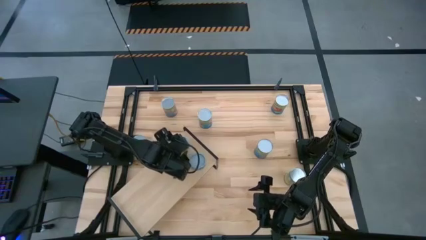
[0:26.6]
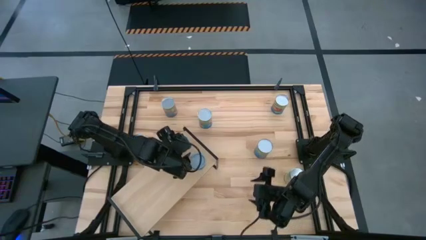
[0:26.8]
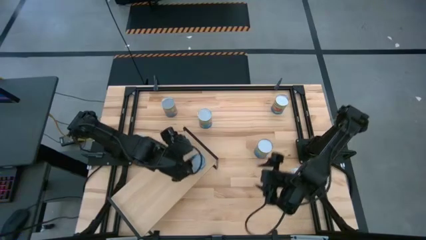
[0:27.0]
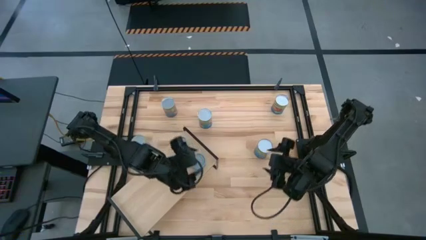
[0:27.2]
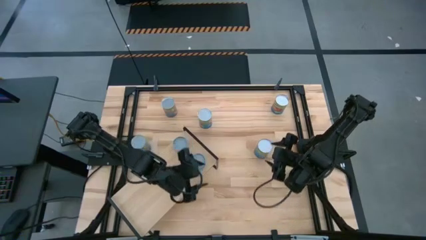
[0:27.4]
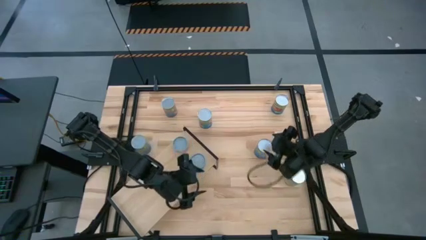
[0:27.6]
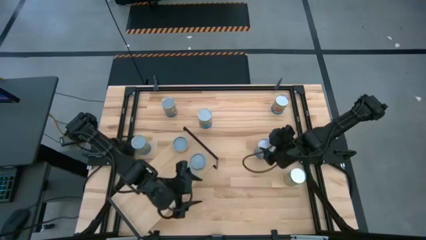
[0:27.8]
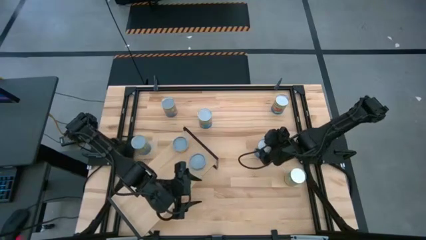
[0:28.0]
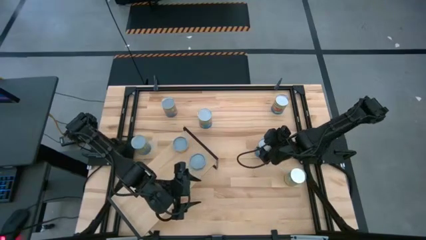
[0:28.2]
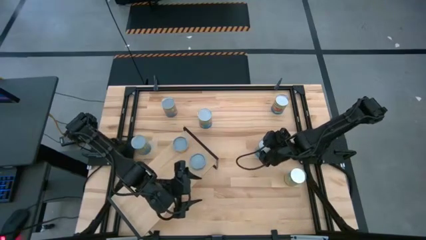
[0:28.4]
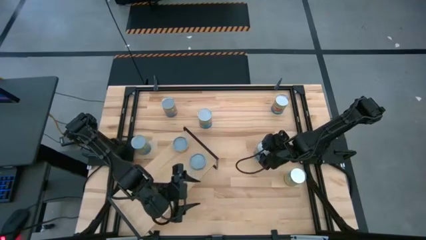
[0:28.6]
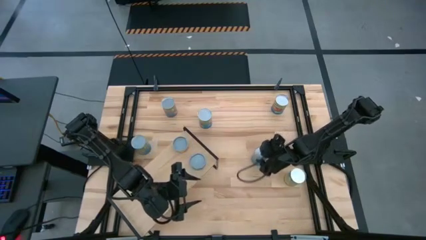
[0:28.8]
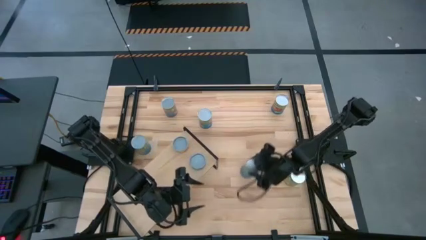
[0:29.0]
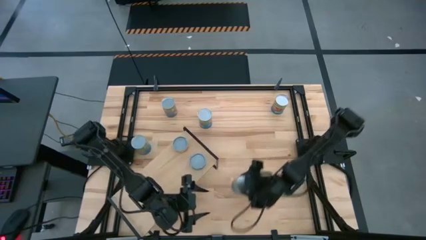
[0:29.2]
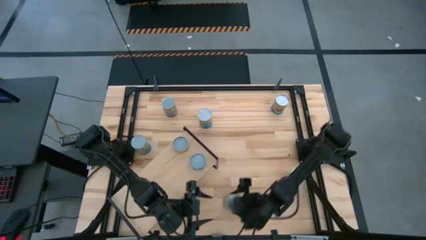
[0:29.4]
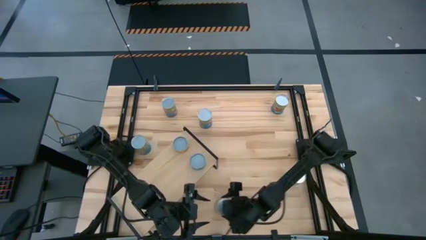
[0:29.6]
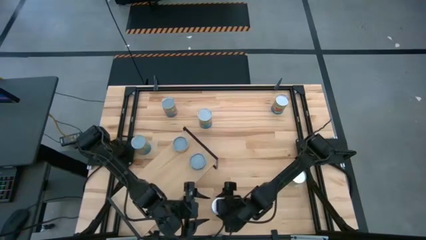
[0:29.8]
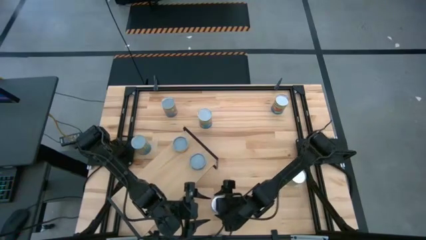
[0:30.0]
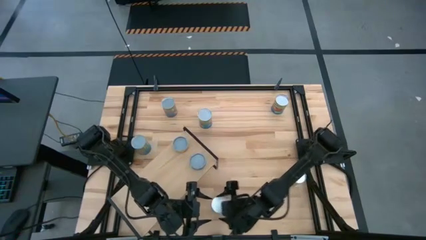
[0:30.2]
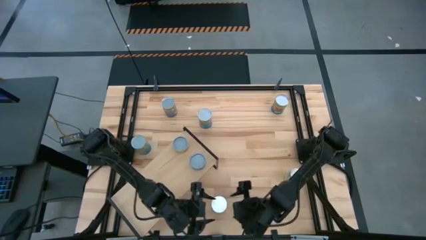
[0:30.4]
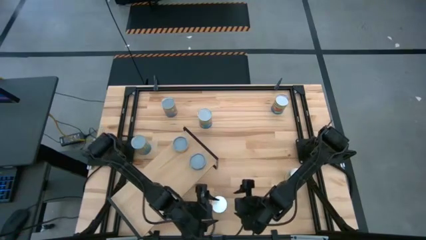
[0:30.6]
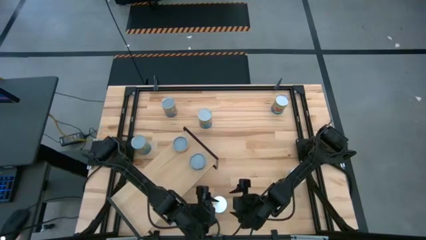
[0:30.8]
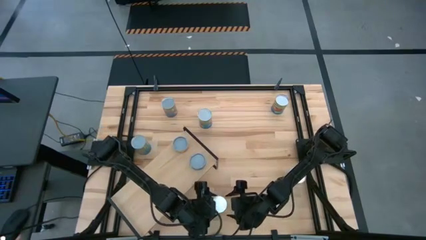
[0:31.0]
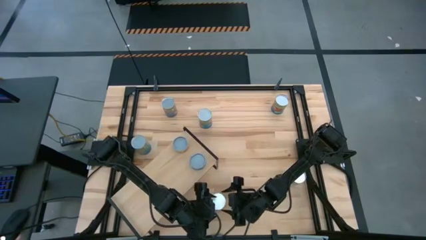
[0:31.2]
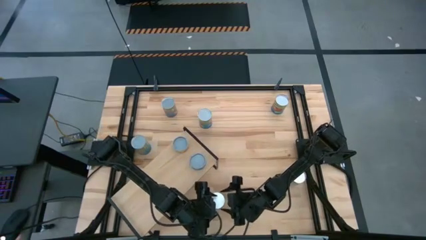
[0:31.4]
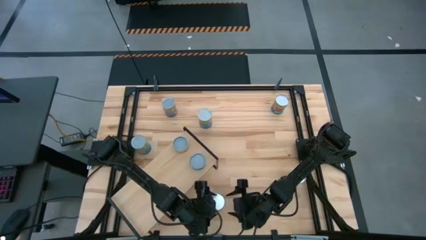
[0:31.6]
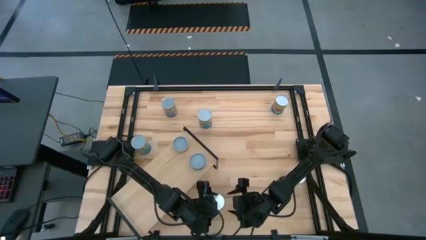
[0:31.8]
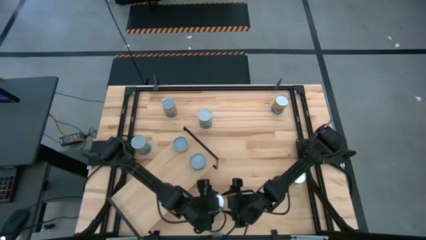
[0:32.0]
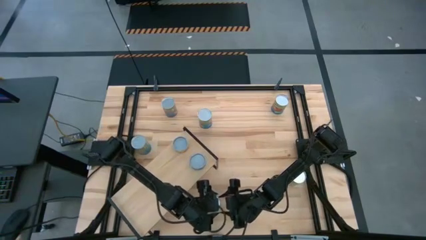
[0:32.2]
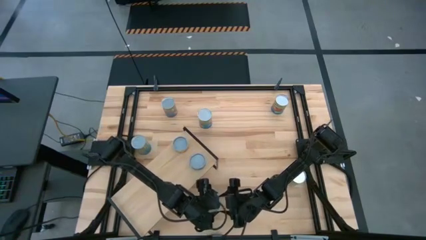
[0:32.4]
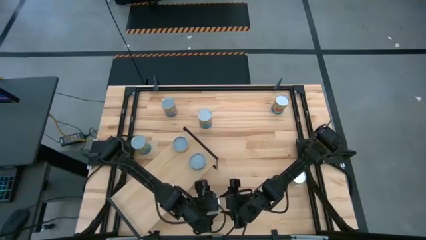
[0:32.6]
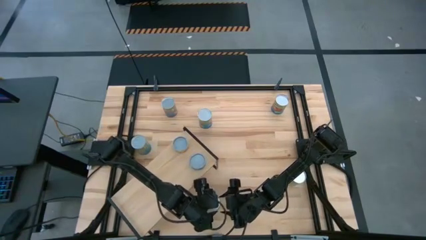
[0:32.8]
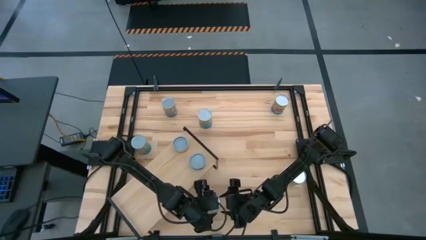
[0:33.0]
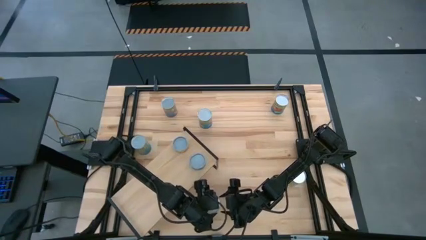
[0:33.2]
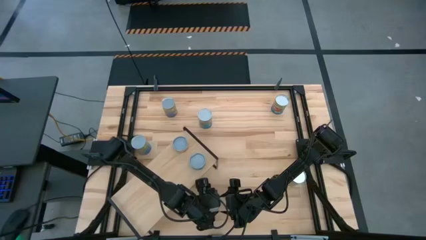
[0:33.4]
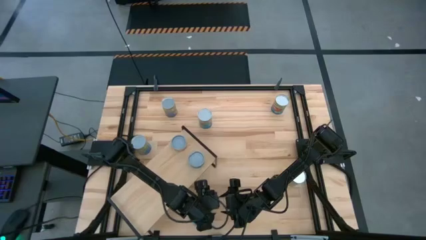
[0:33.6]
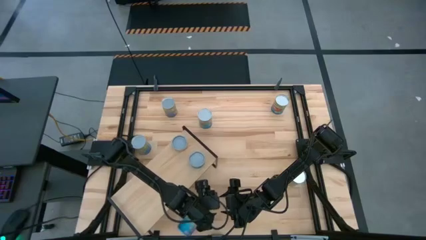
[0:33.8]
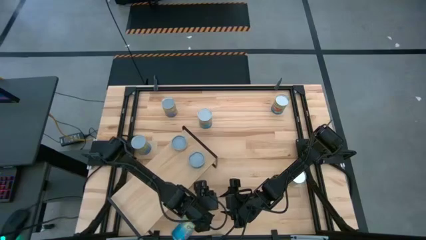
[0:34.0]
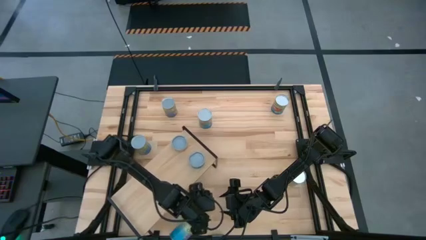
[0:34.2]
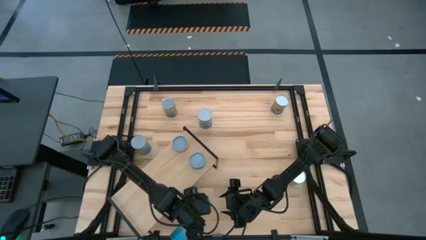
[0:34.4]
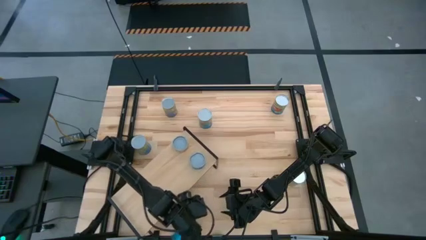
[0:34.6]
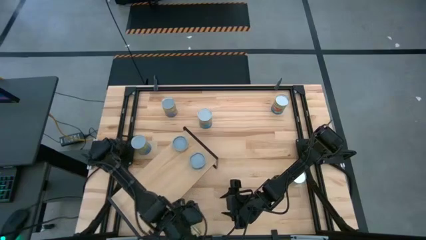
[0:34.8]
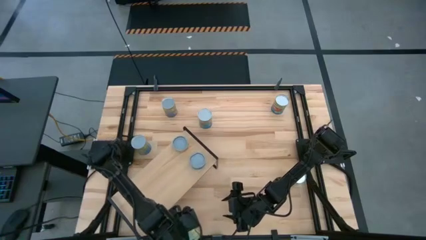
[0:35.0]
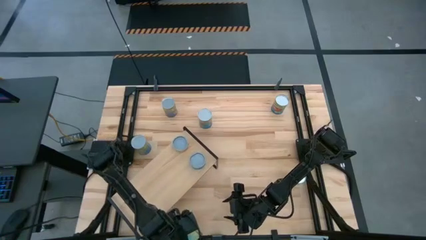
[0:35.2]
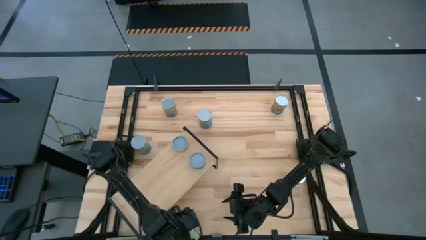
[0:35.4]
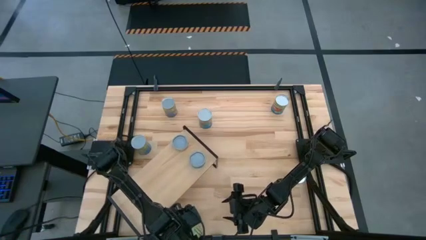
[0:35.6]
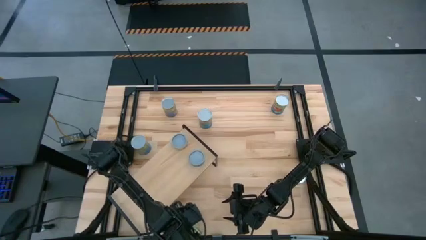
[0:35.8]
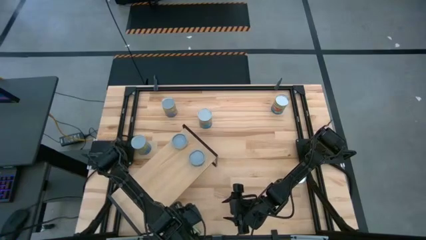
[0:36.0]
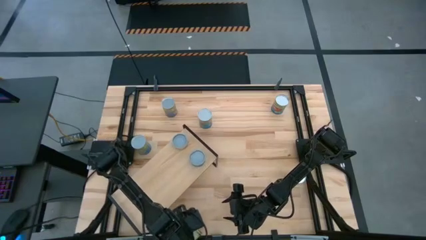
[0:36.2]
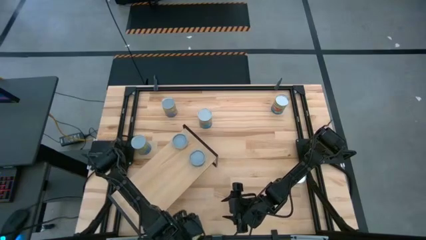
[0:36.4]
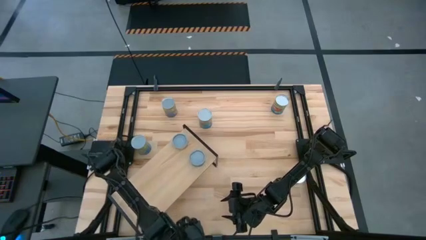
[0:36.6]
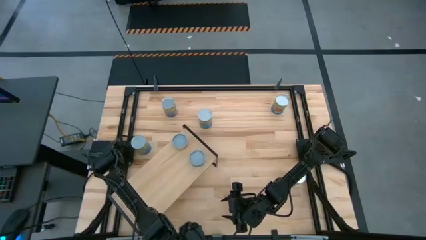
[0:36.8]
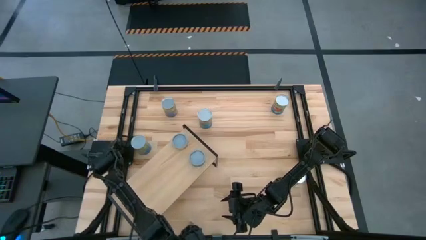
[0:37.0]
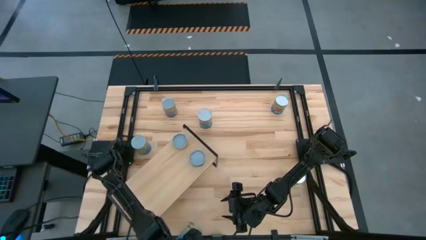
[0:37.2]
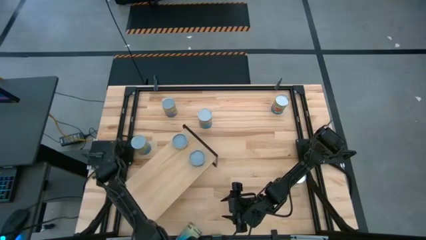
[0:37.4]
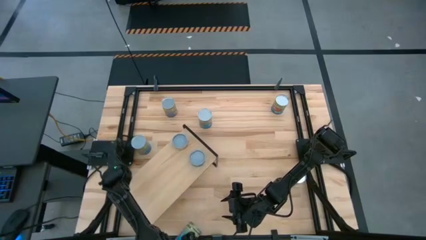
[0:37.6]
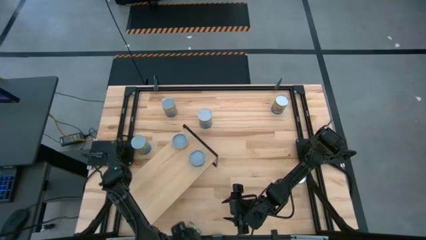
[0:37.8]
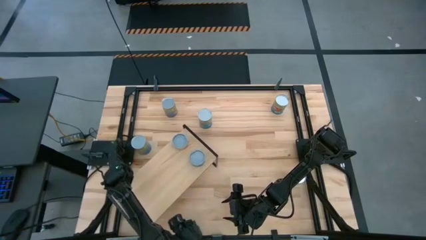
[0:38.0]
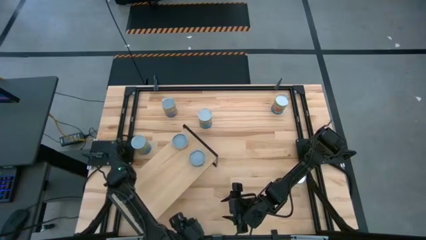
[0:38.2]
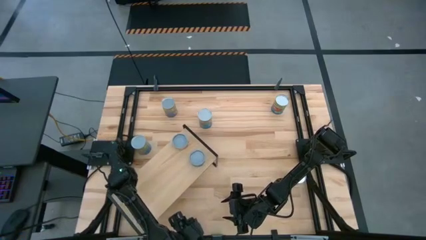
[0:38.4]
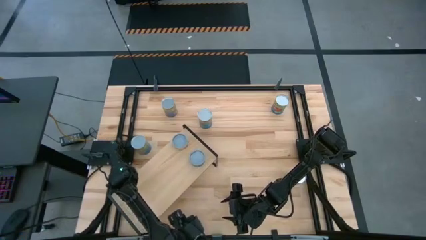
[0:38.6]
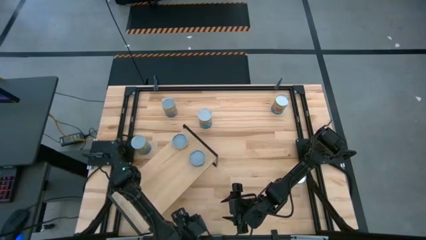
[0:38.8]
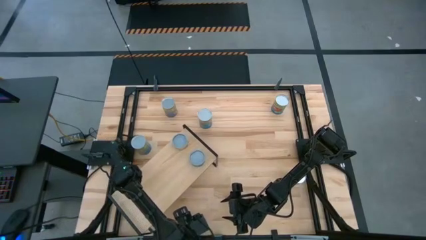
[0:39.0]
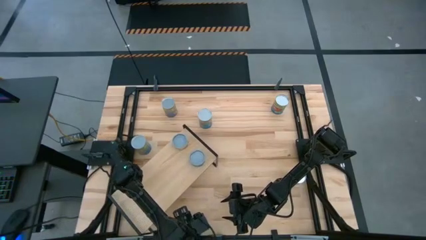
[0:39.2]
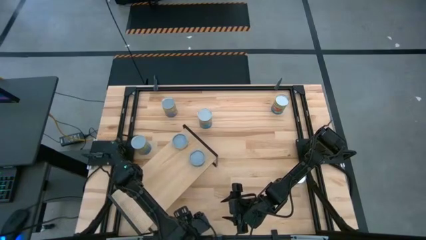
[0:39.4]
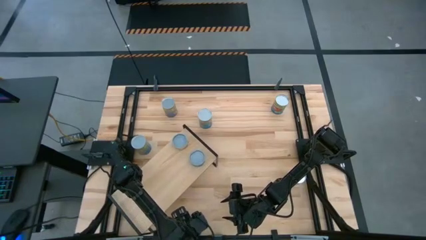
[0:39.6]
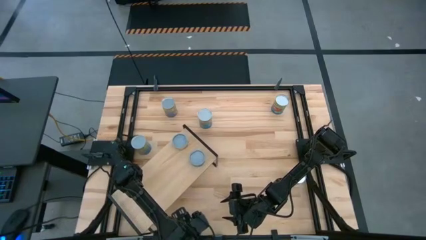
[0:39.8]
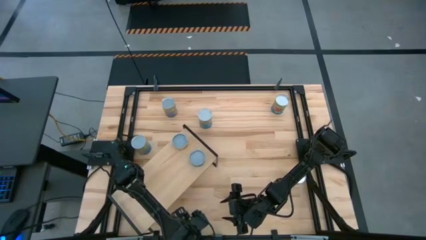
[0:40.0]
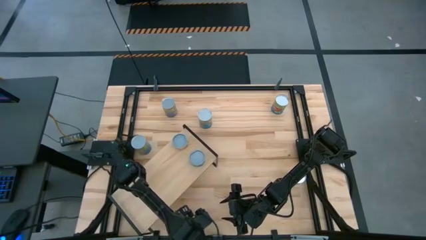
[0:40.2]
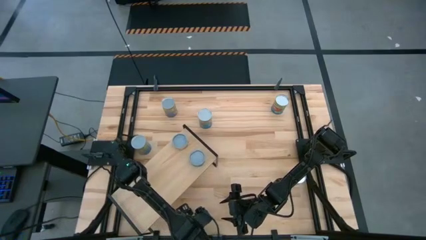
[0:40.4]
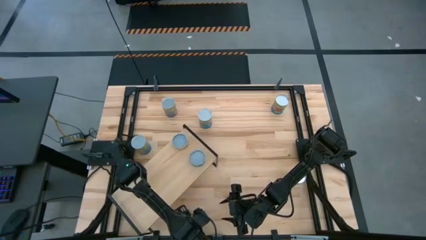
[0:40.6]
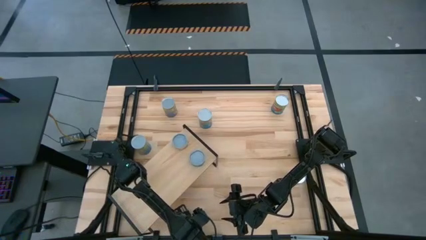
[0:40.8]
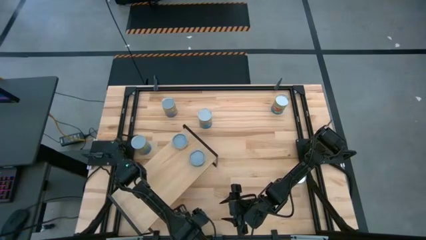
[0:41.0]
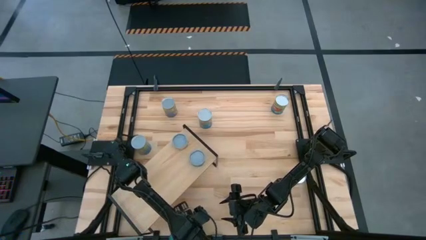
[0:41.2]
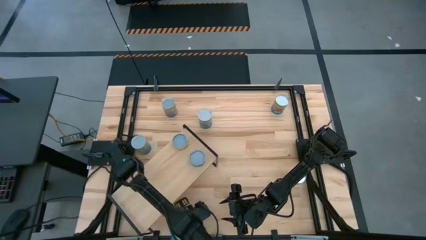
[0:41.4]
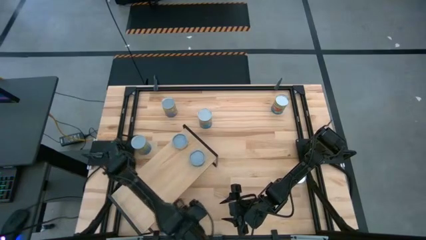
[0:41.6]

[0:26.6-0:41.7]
Task: Pick and place cans onto a shelf
Put the right canned cherries on the shelf
